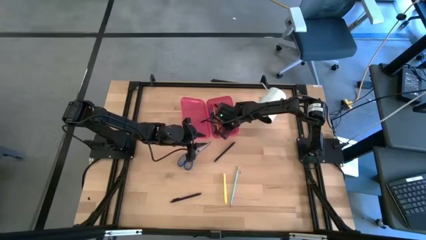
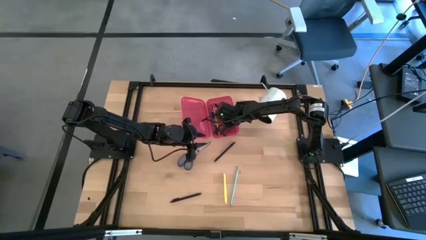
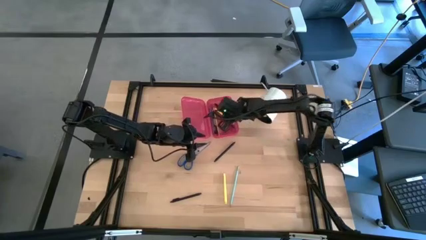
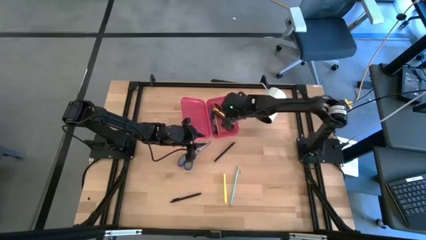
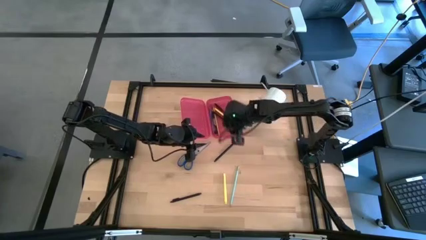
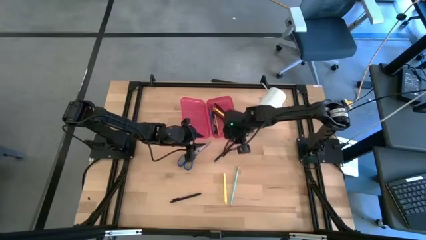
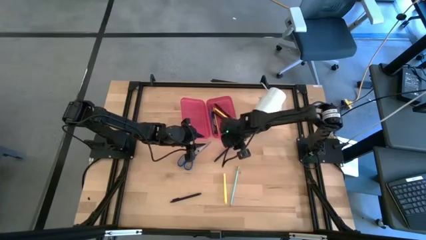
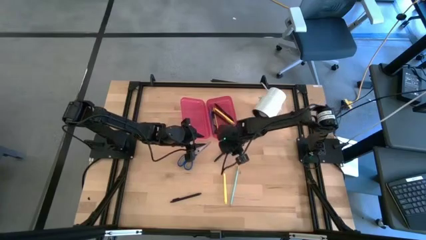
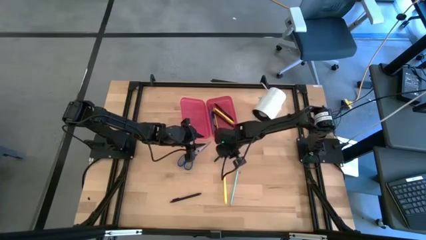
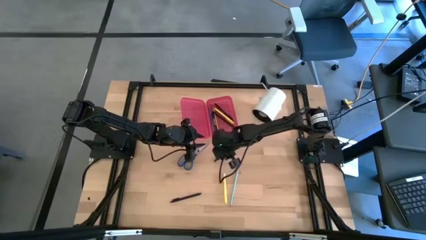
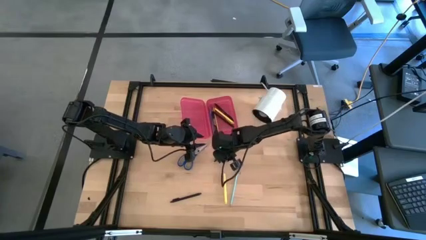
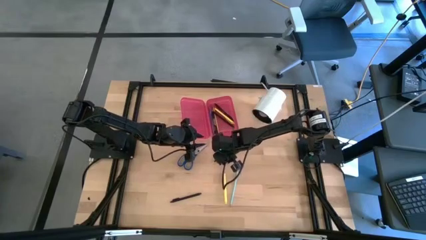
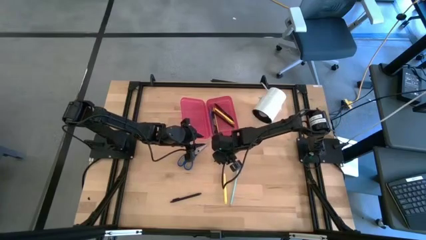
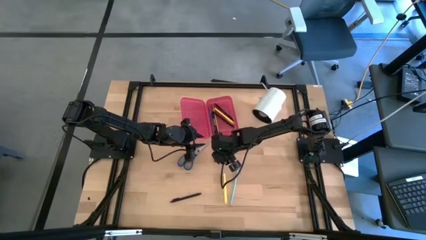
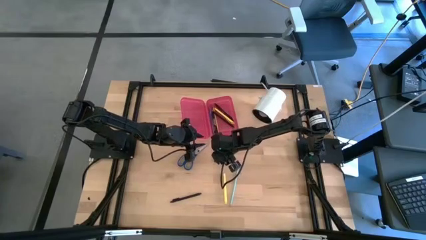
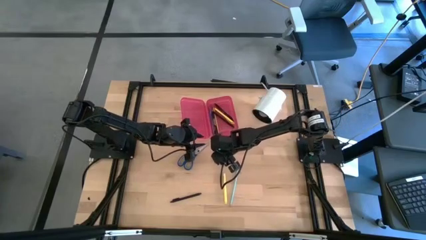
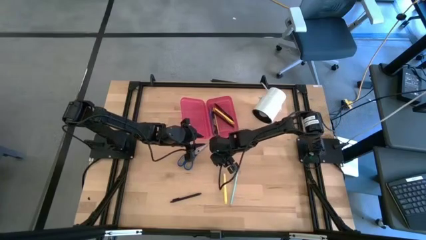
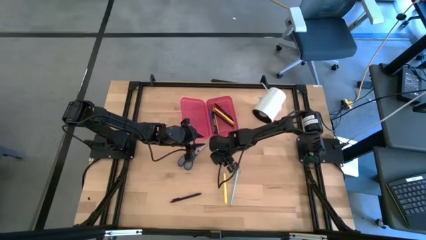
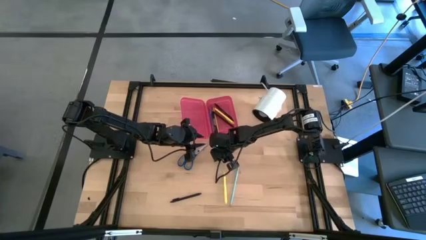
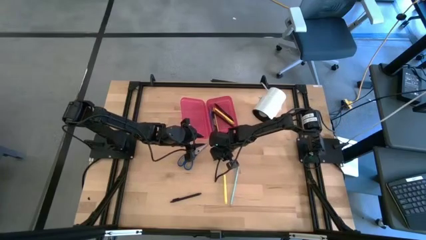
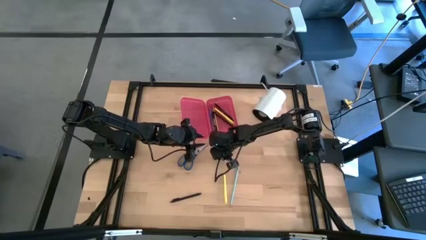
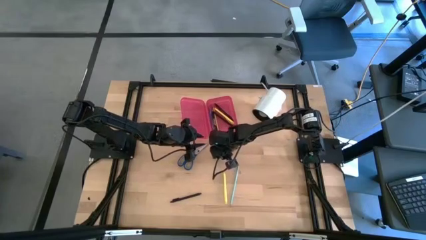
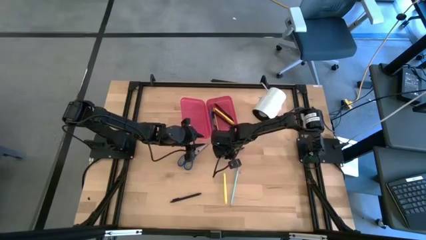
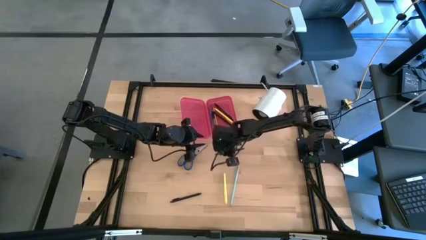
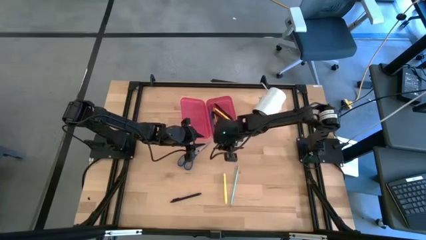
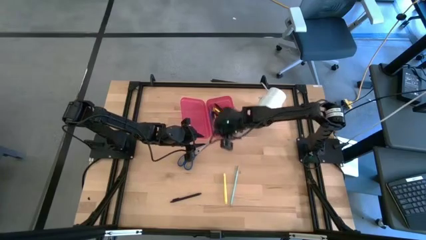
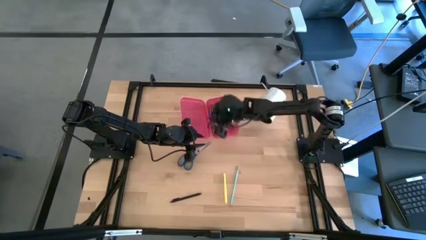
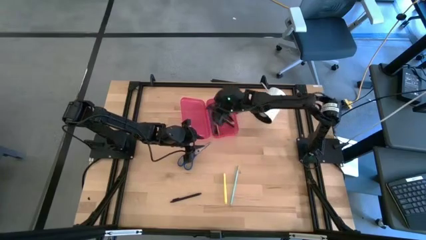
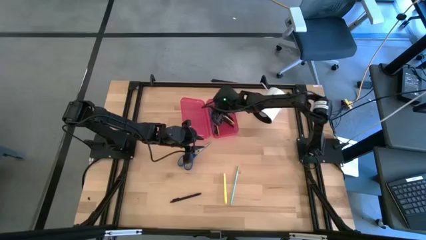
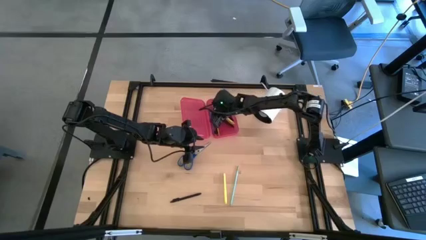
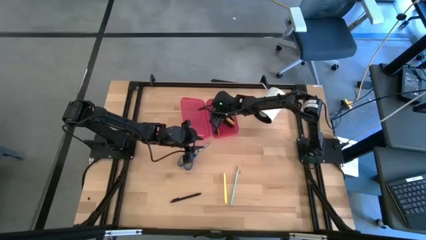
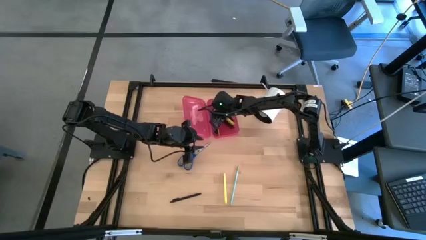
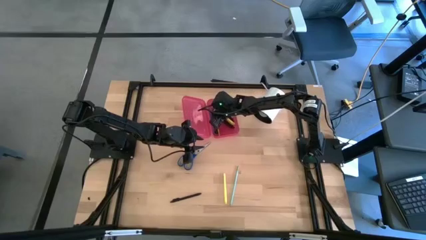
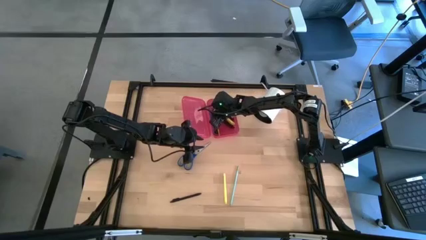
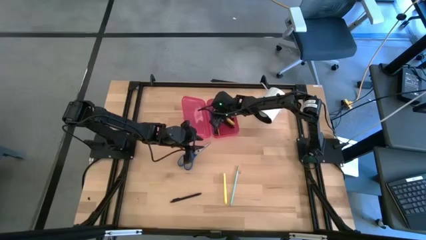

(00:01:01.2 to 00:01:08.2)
Task: Pick & place school supplies into a supply box
Put the black pen into the red supply box

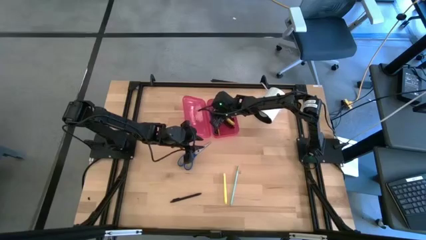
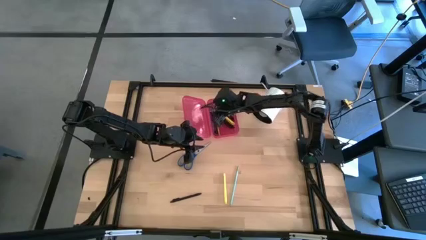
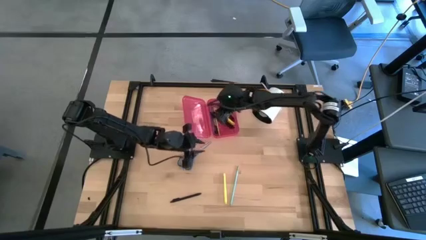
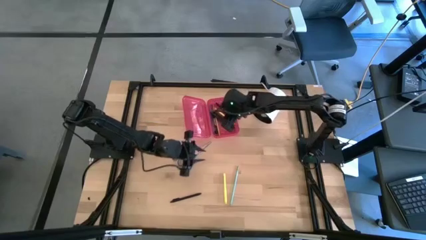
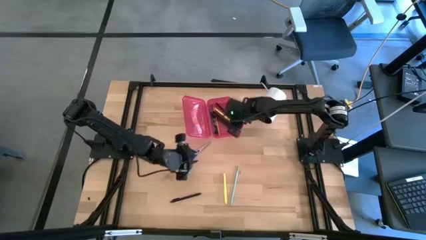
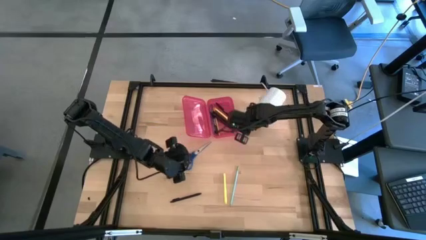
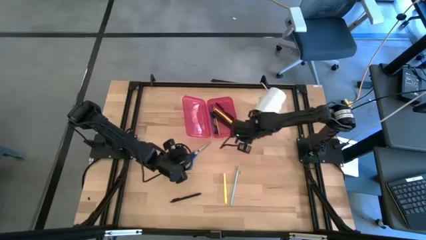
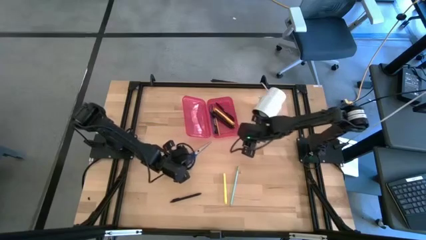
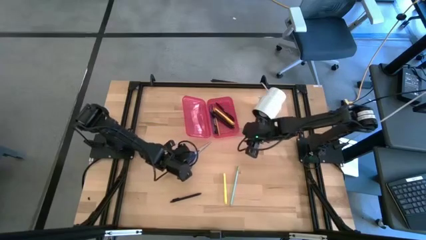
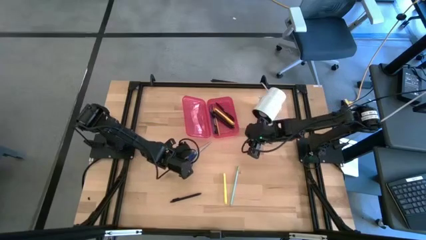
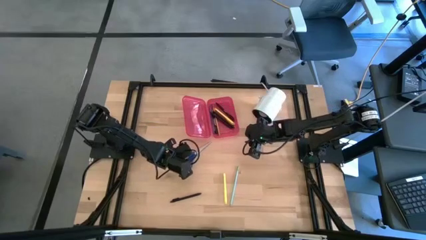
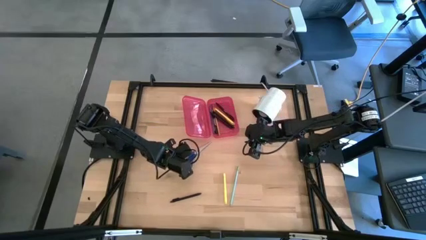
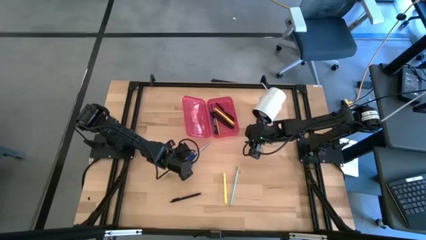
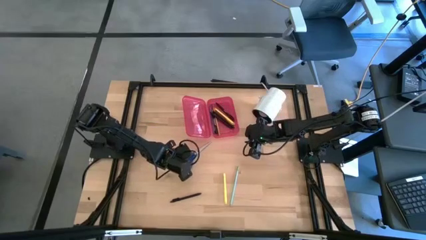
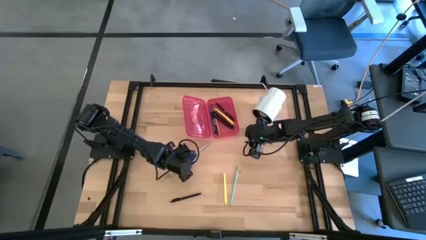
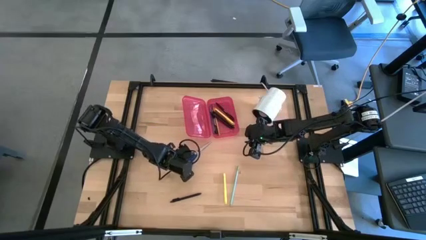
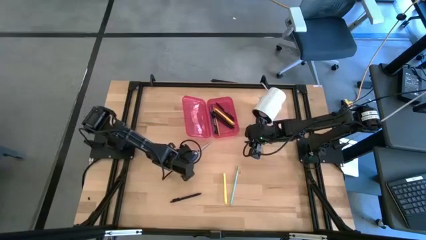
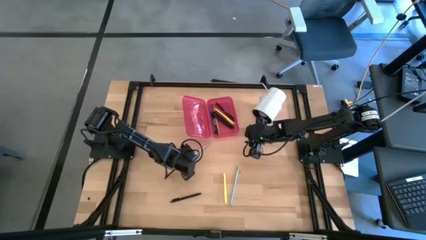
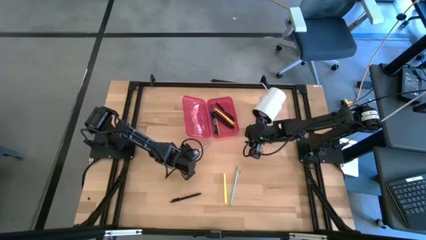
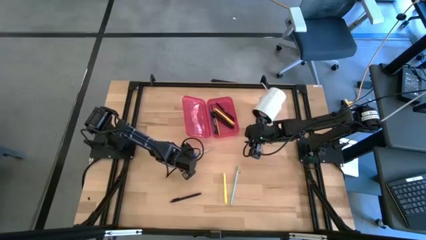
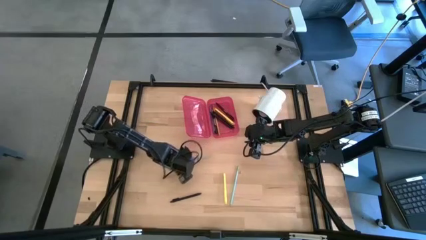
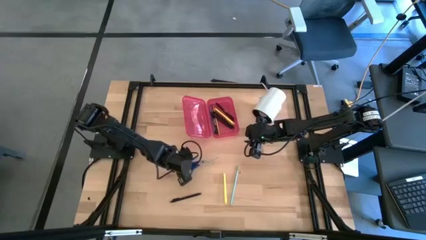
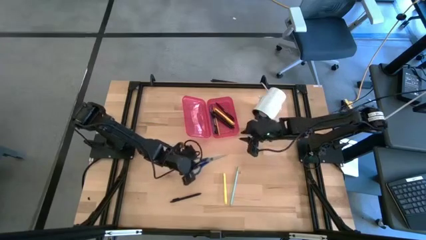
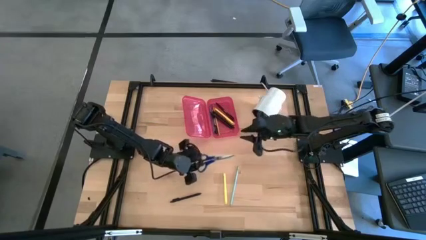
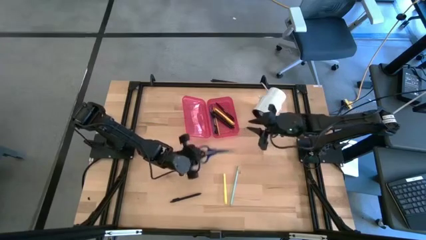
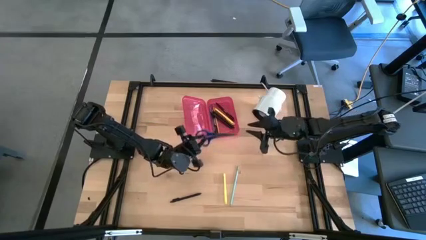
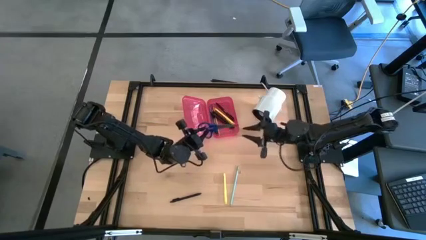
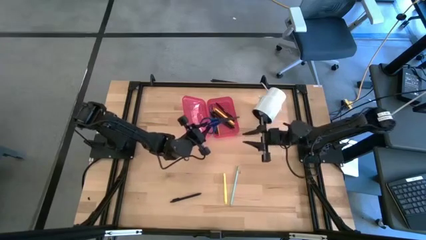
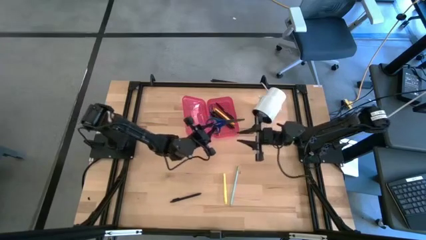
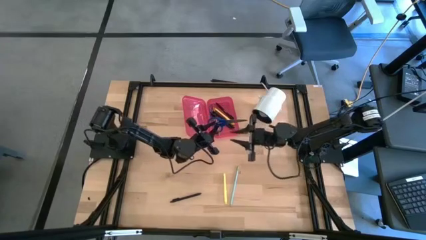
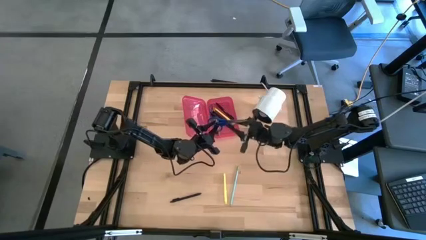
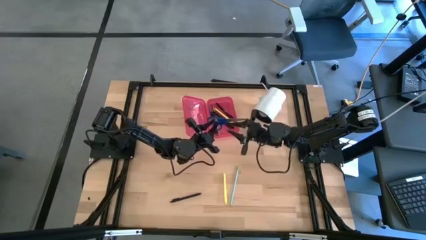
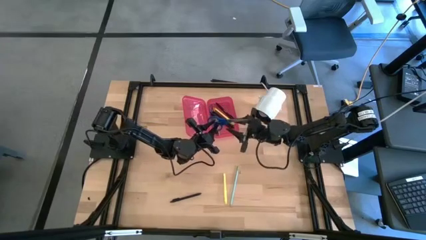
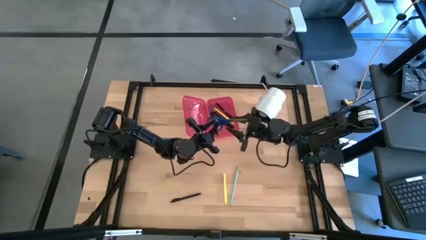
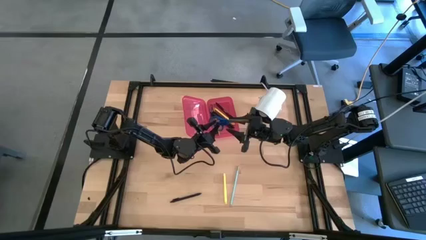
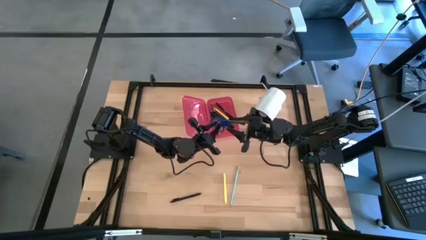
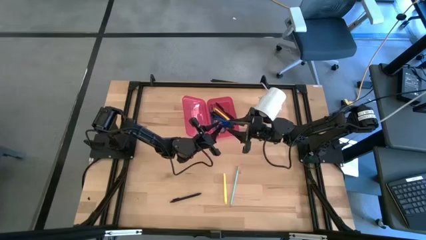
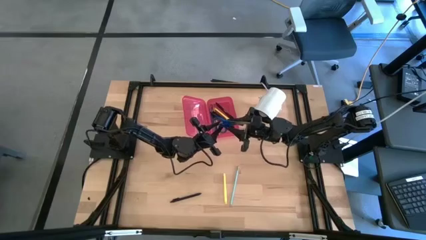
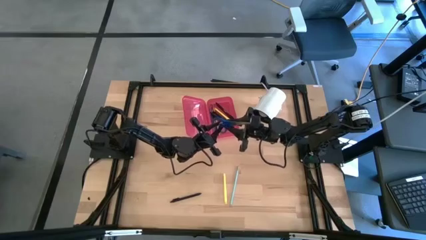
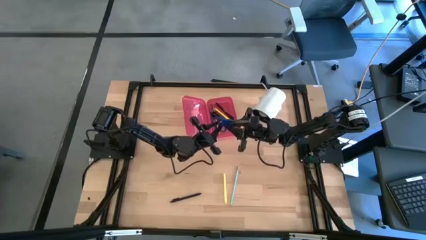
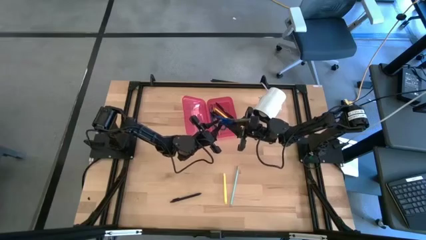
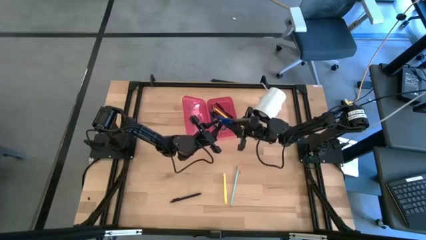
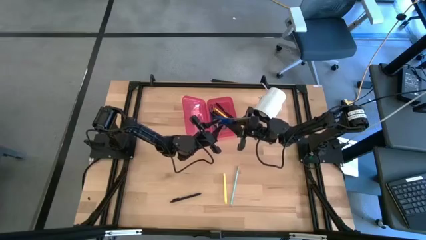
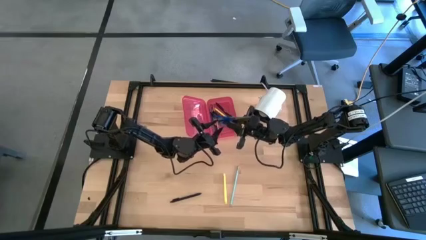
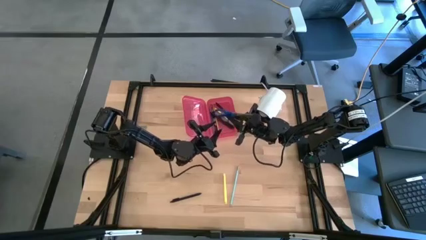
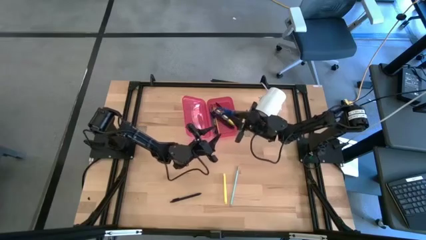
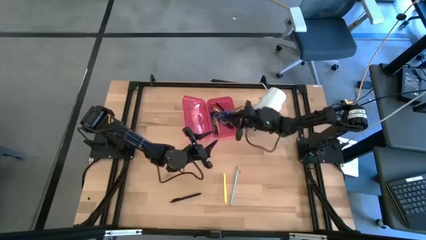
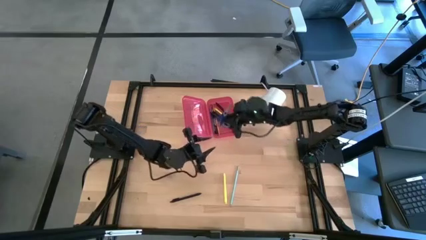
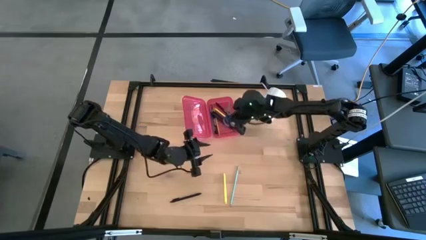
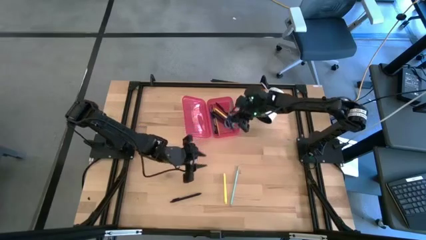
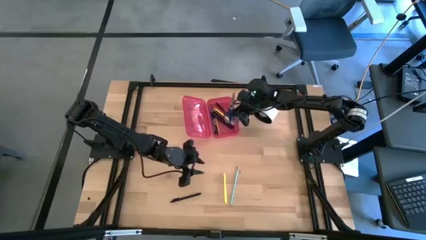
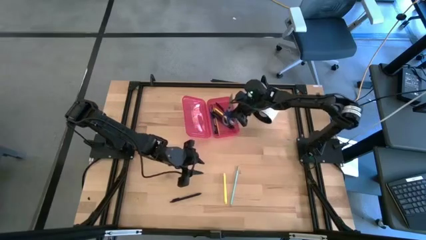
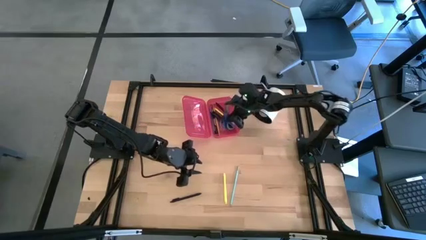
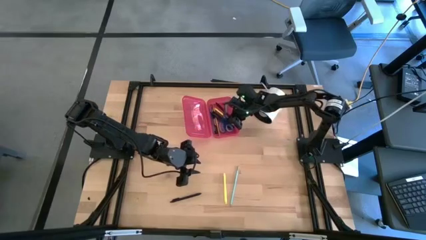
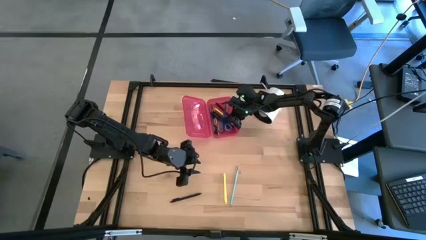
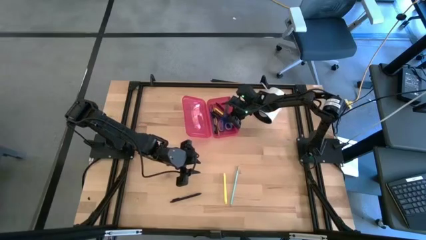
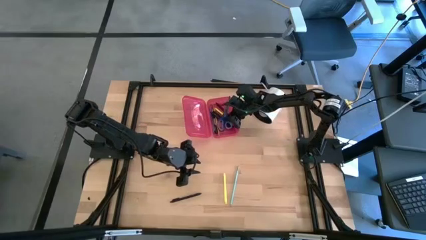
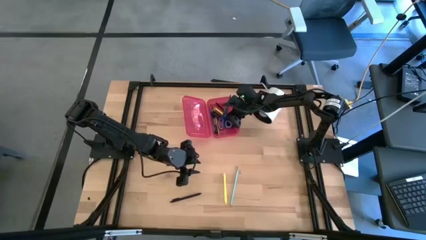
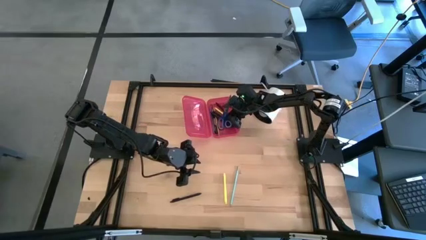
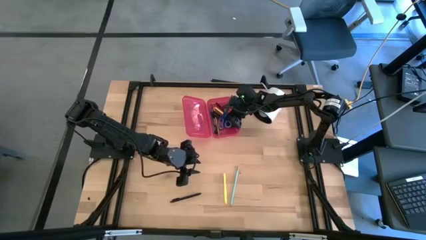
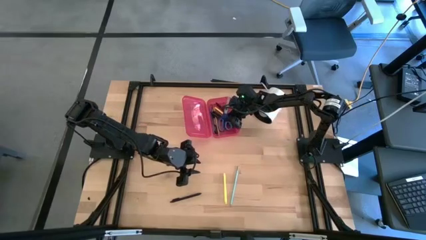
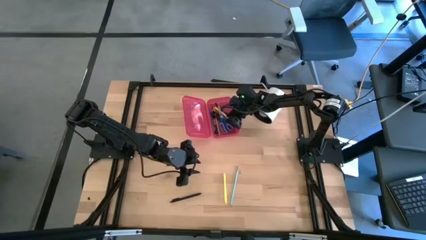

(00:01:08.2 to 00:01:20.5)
Put the blue scissors into the red supply box
